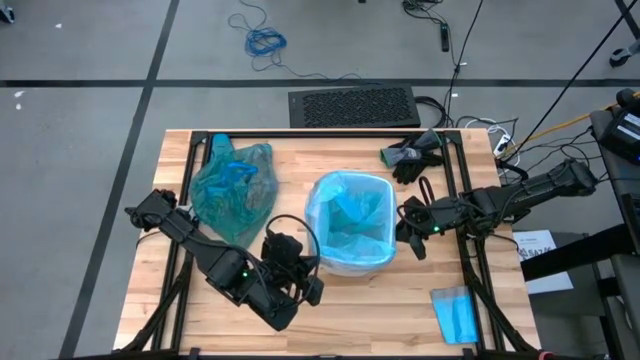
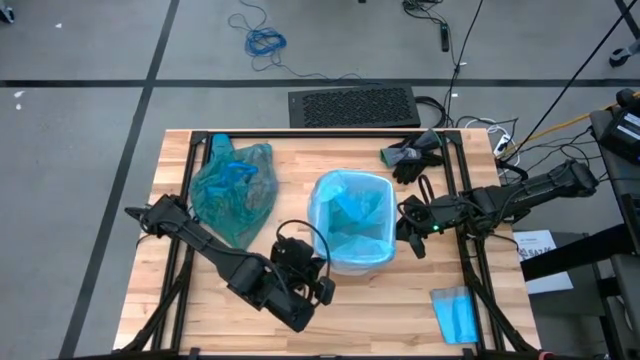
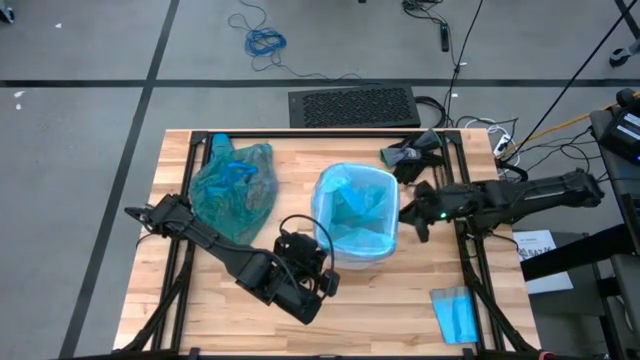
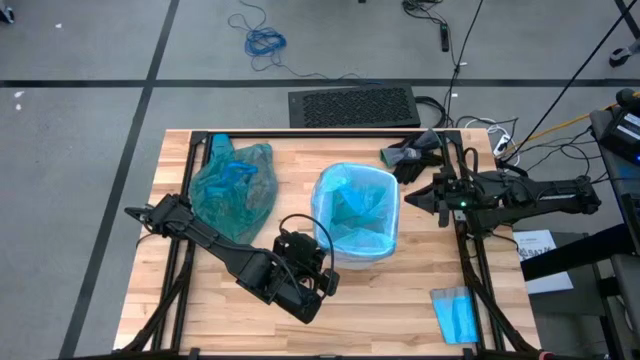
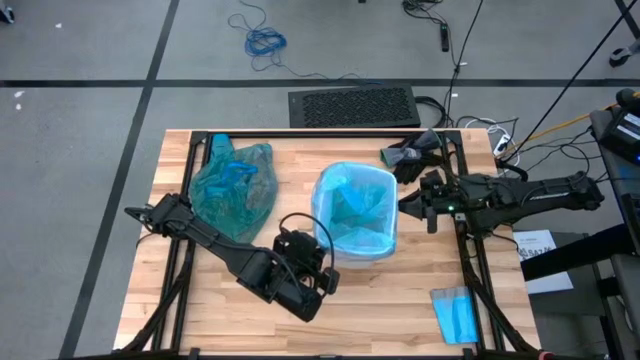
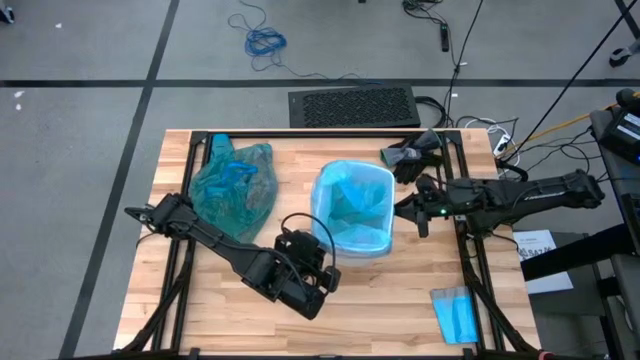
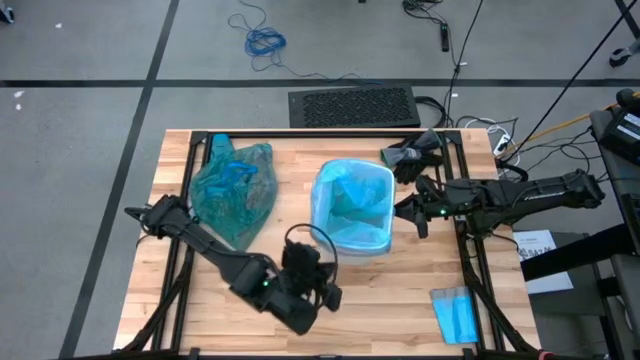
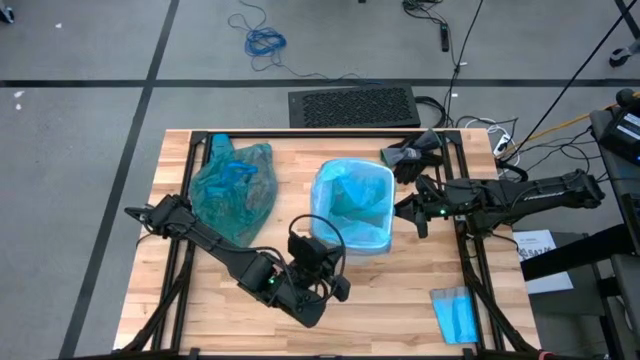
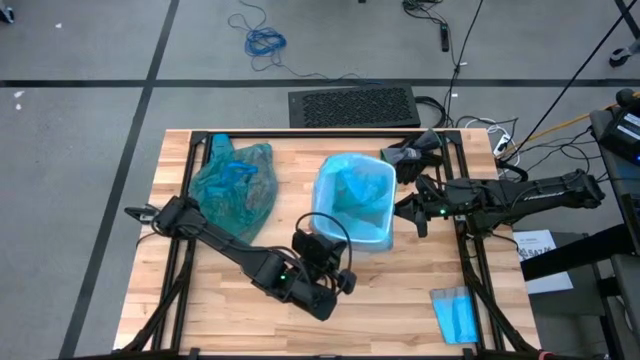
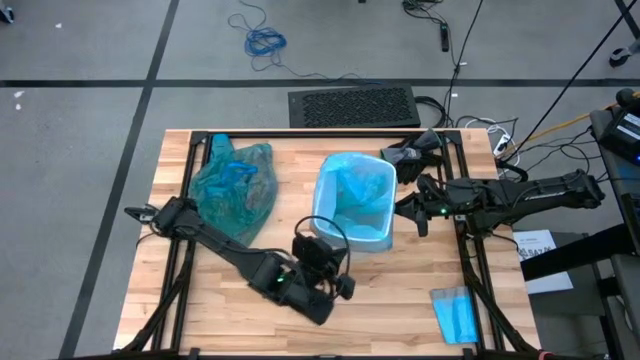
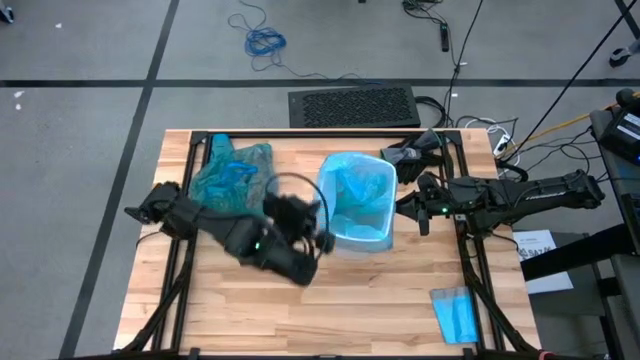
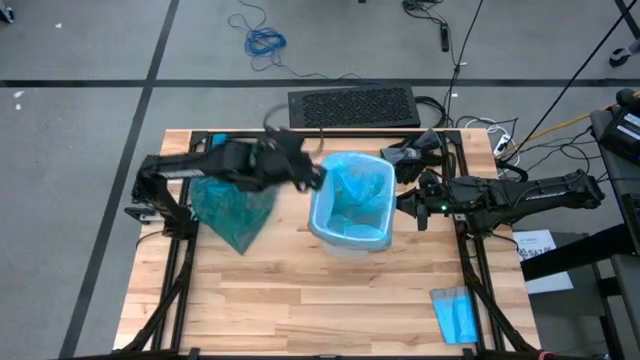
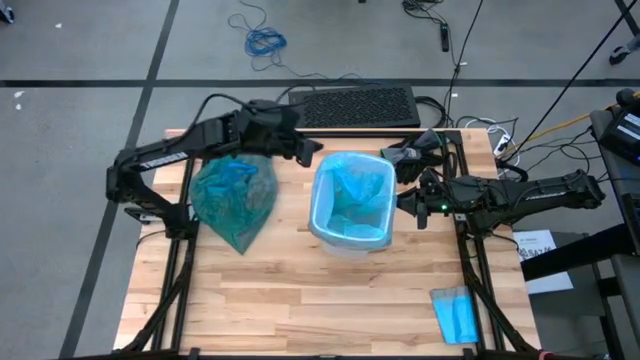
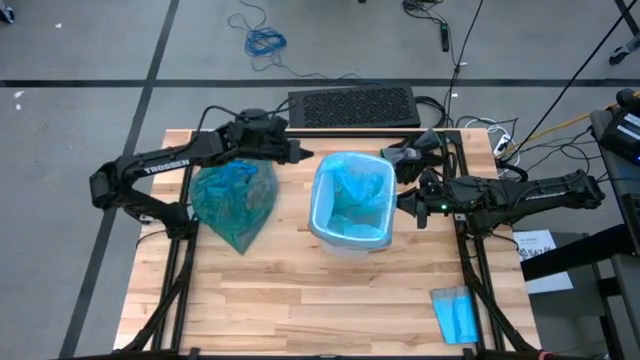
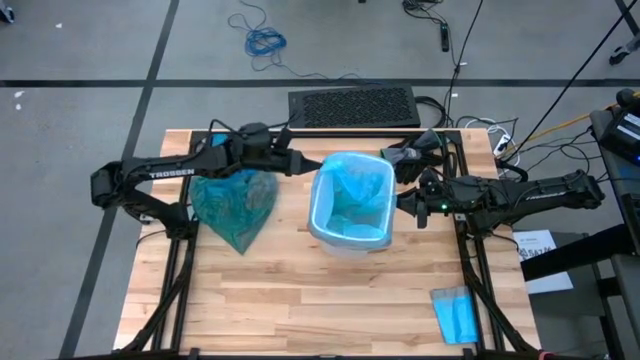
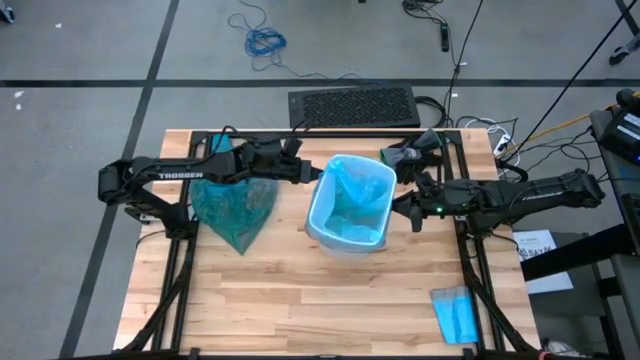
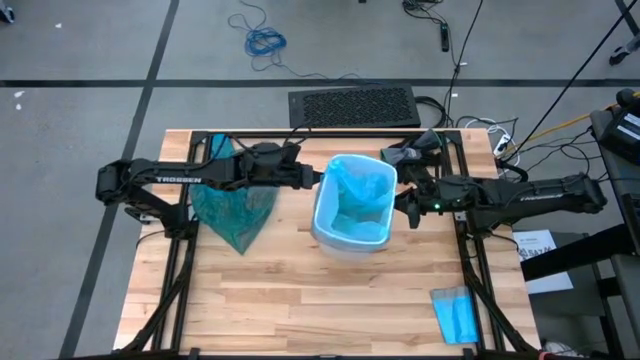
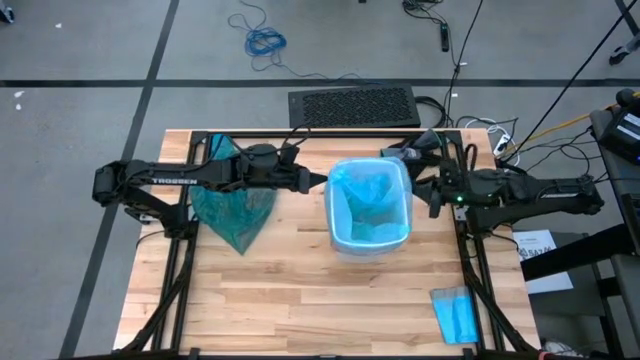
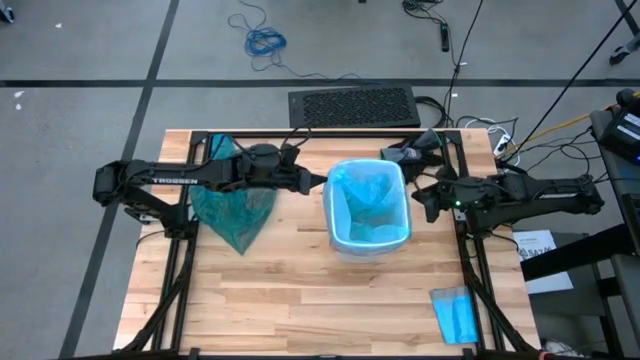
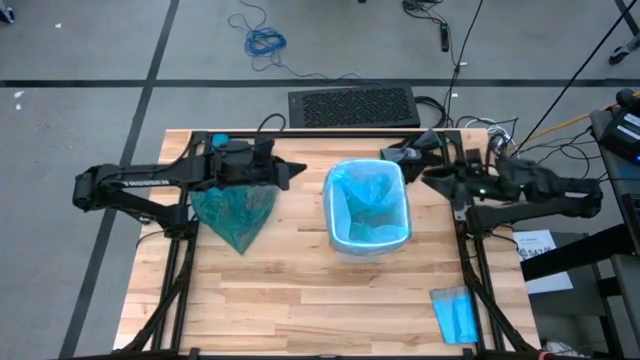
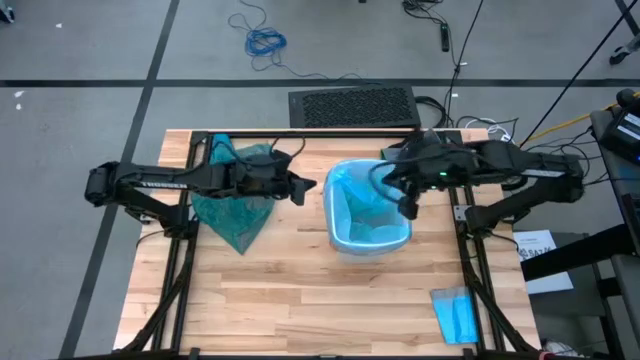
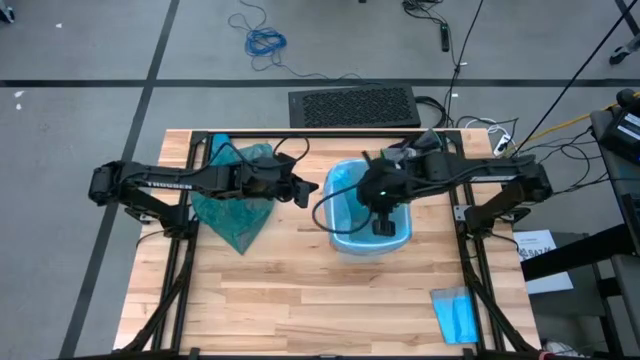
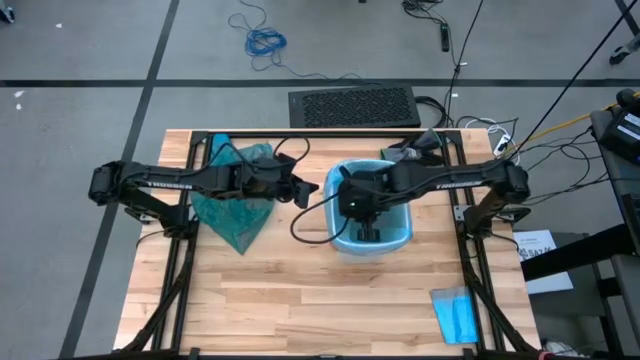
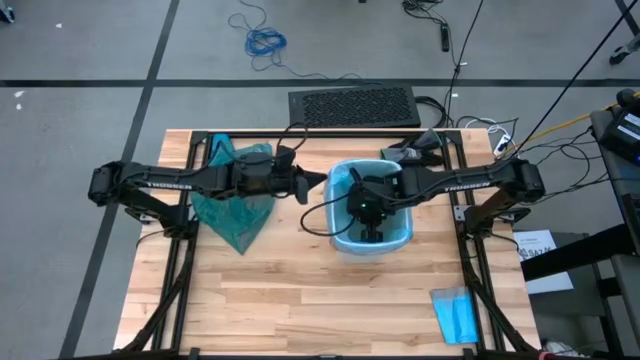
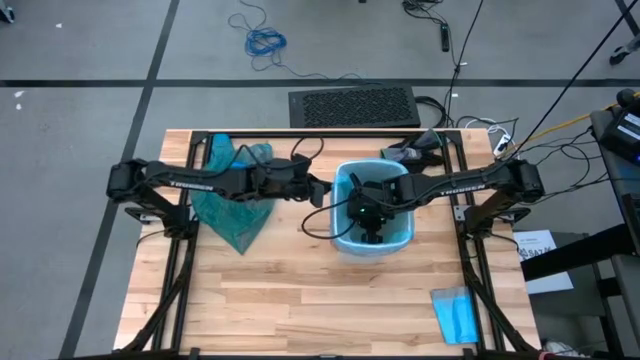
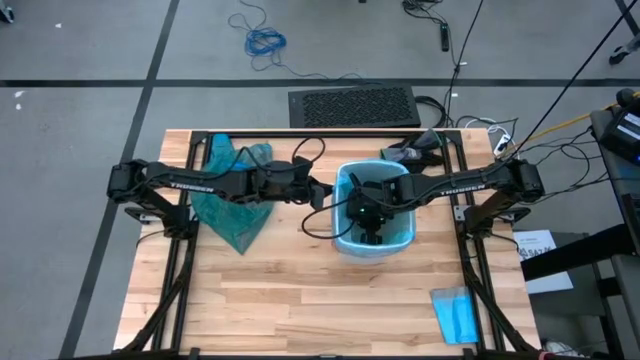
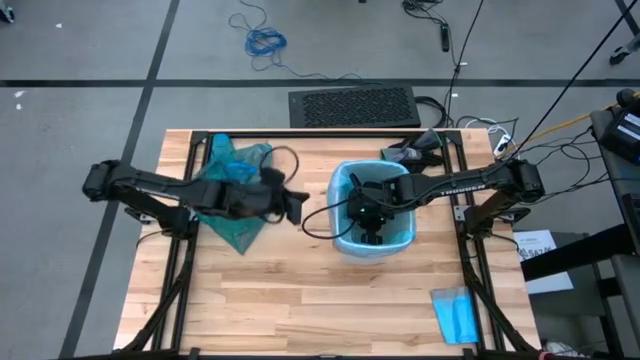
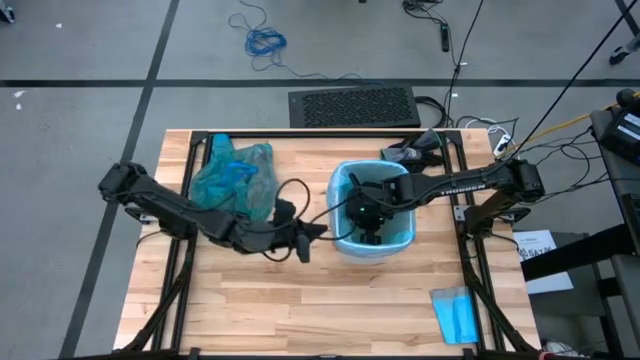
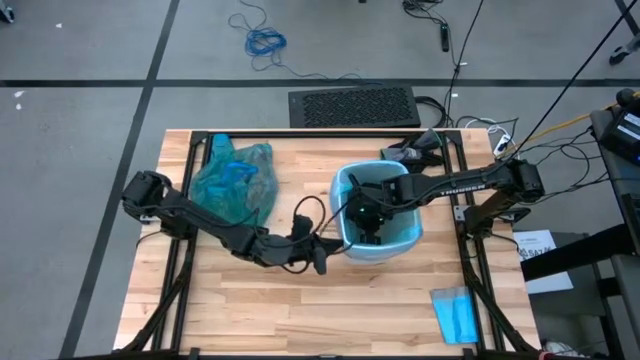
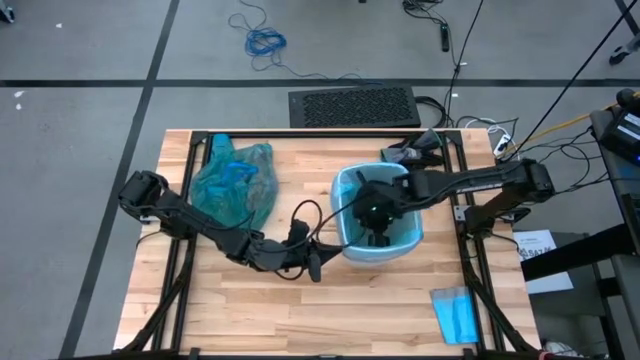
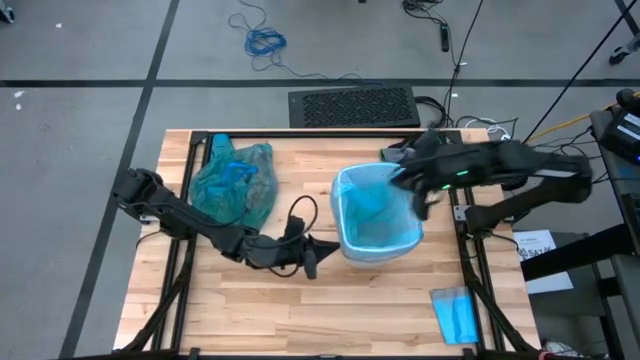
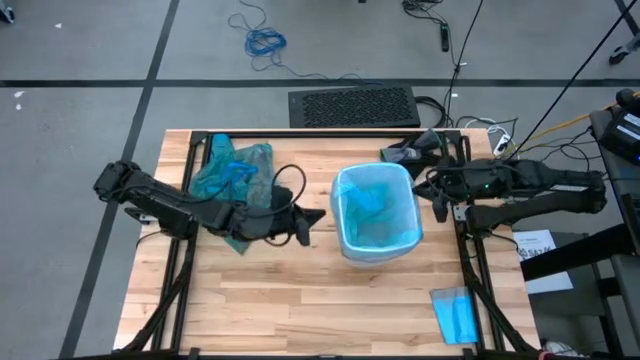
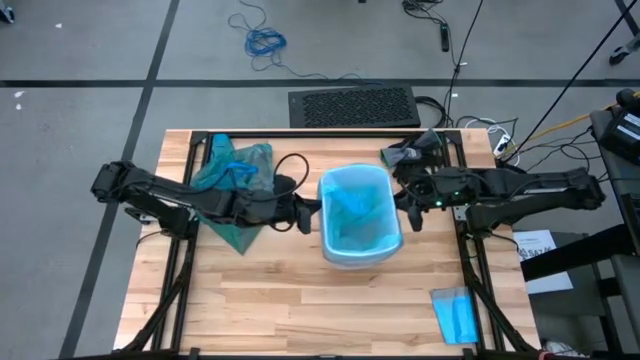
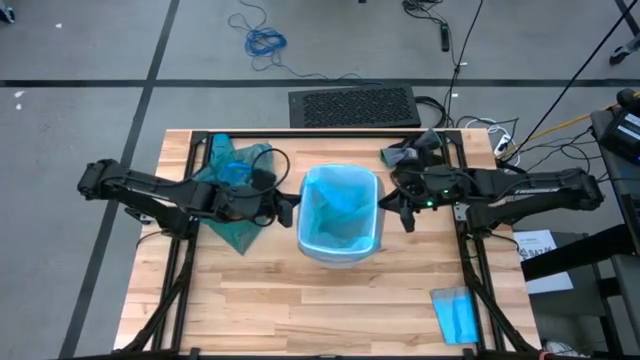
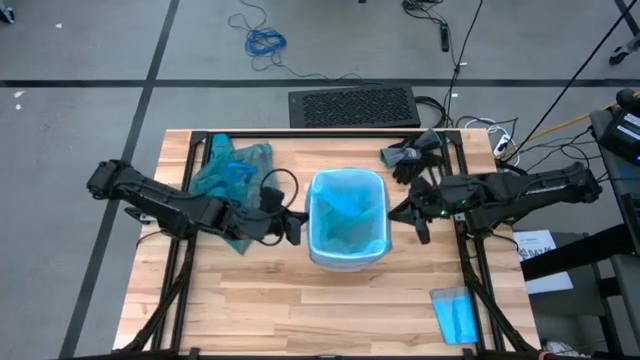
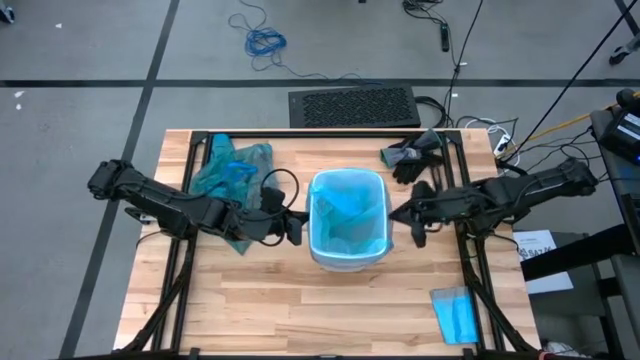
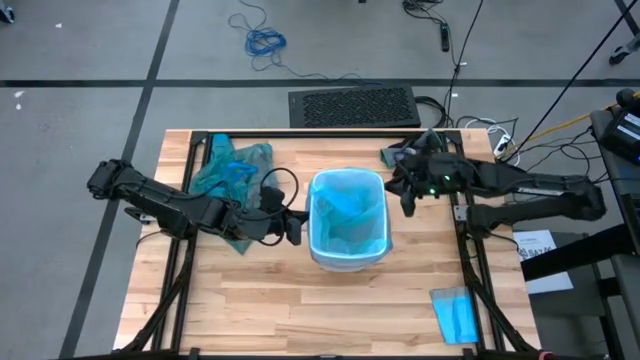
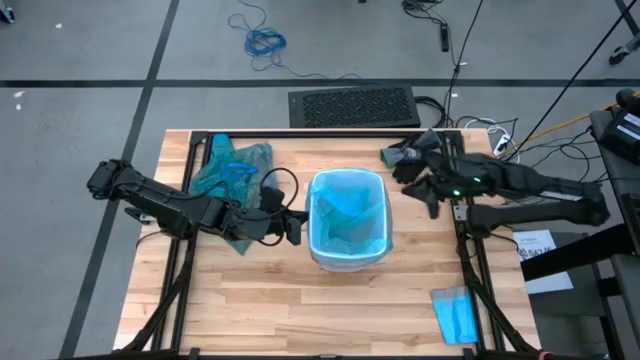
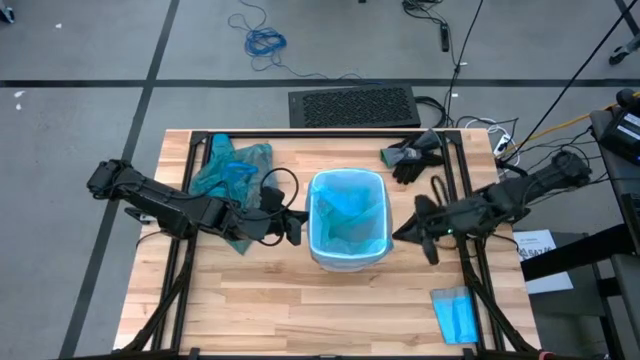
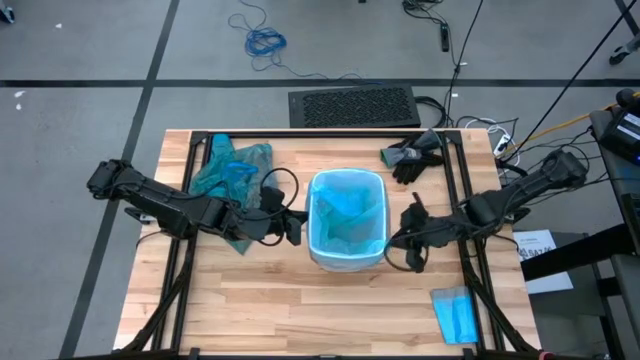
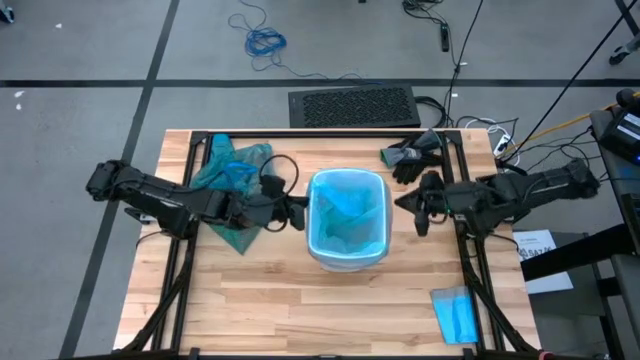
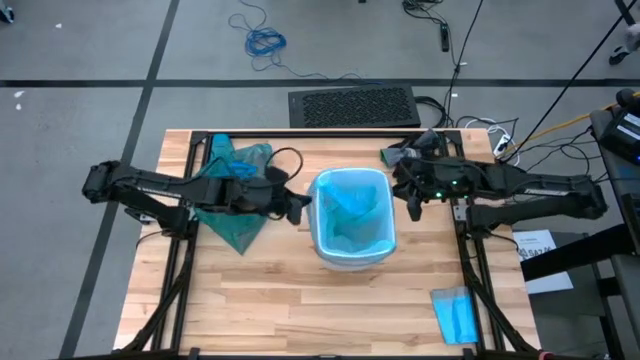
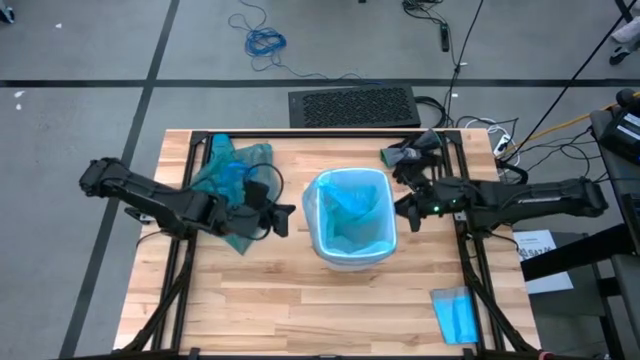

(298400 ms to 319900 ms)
Task: place trash/remove bag and relplace
Insert the new blue trash bag into the trash bin
